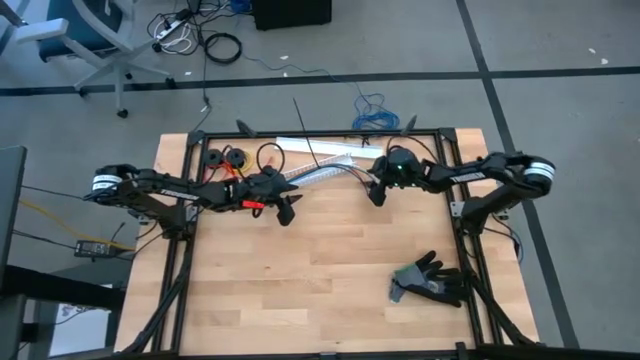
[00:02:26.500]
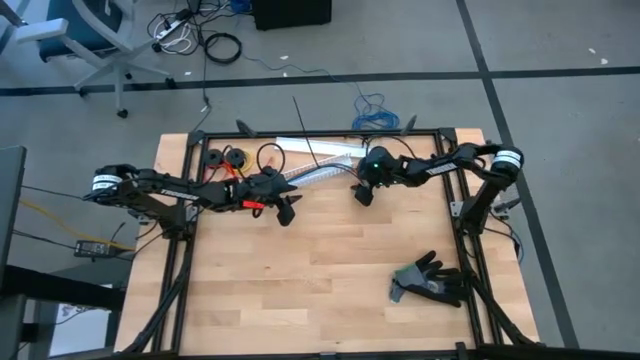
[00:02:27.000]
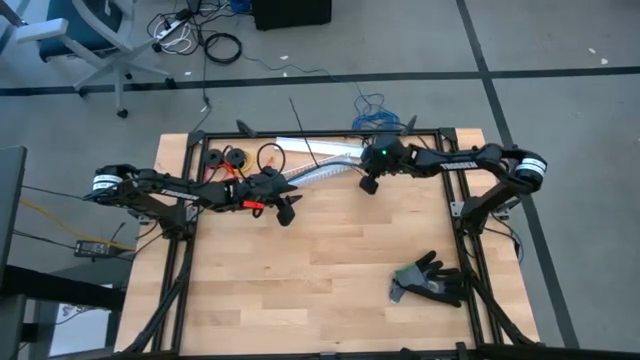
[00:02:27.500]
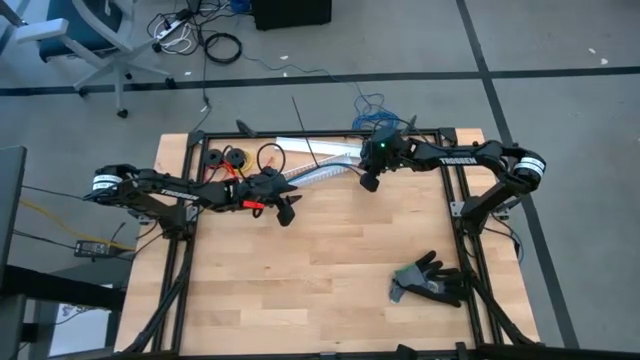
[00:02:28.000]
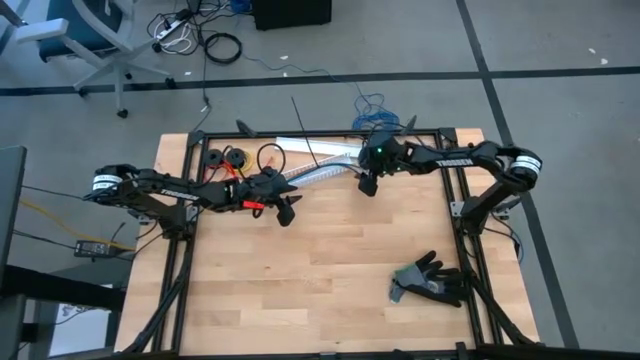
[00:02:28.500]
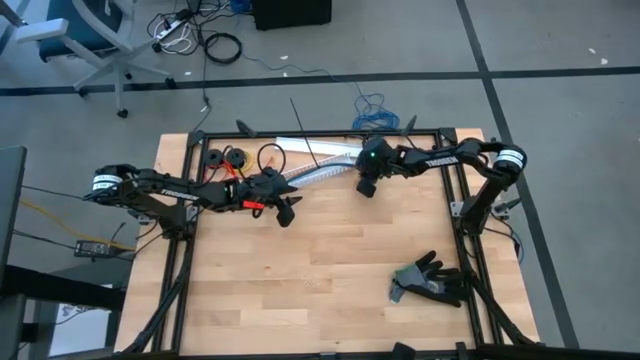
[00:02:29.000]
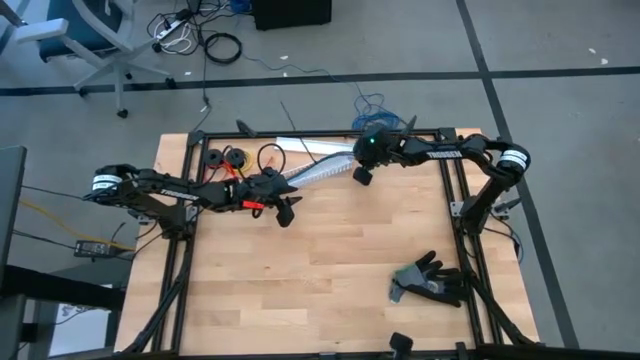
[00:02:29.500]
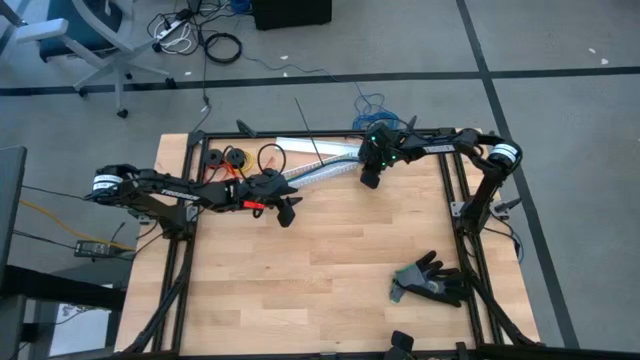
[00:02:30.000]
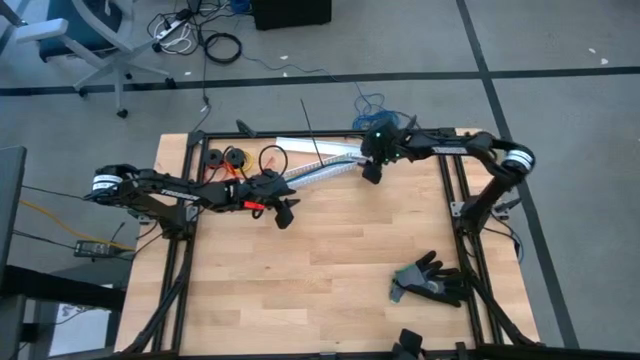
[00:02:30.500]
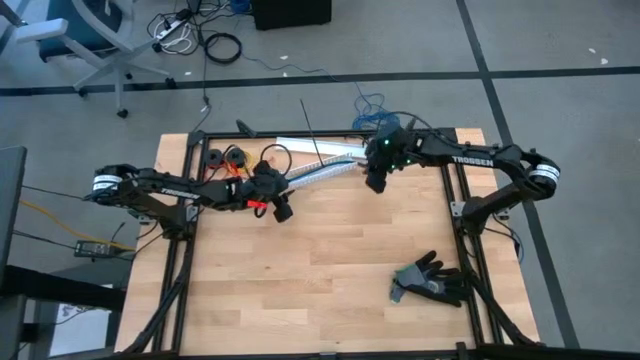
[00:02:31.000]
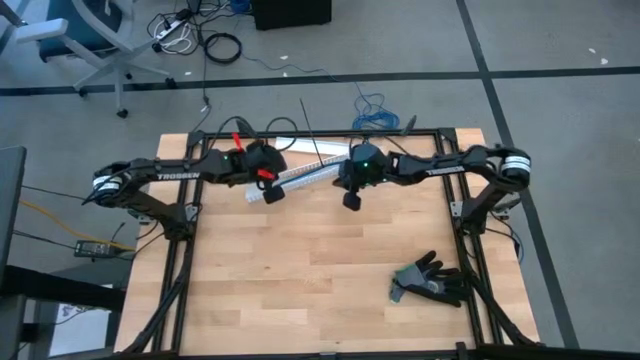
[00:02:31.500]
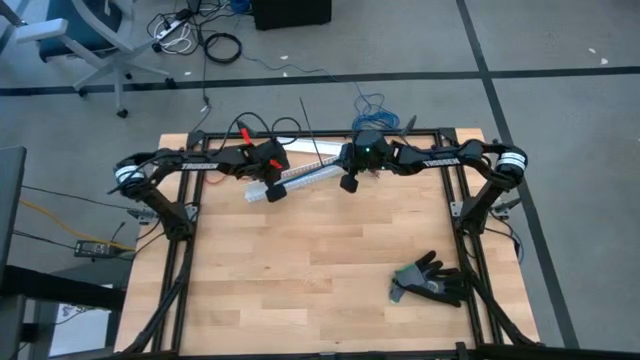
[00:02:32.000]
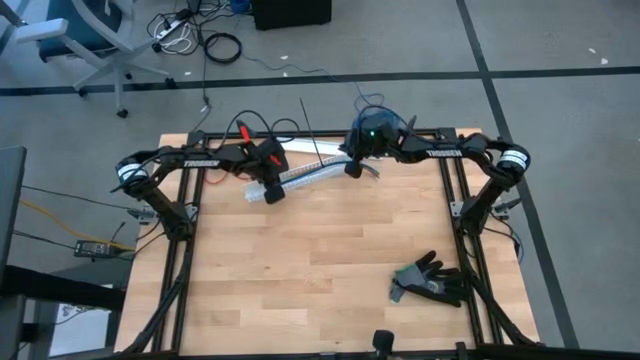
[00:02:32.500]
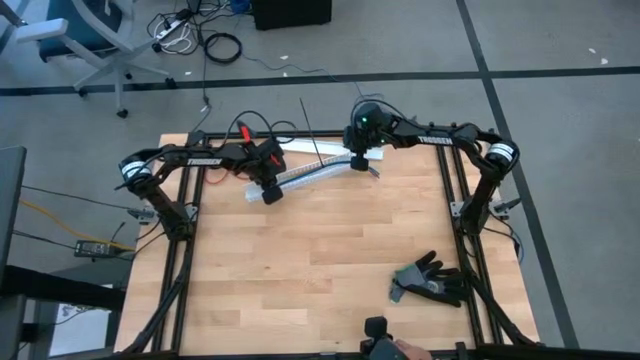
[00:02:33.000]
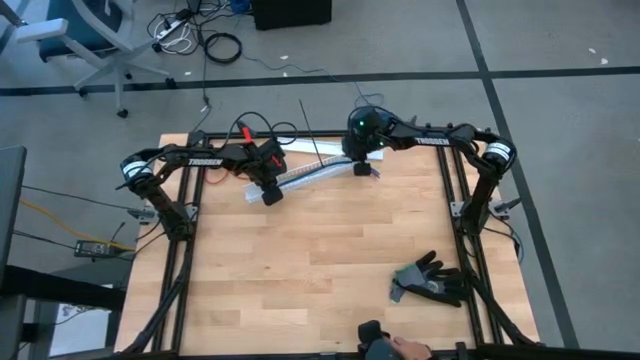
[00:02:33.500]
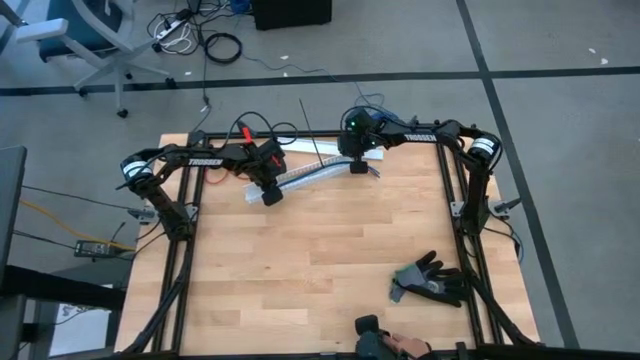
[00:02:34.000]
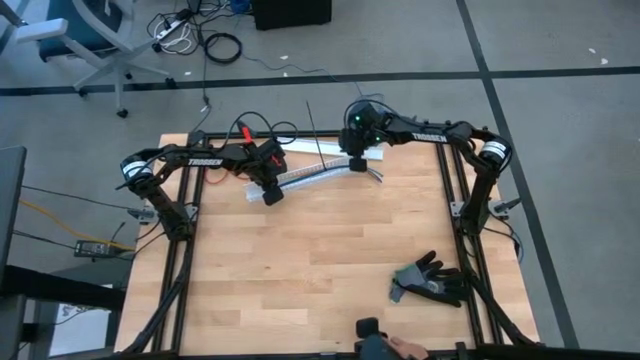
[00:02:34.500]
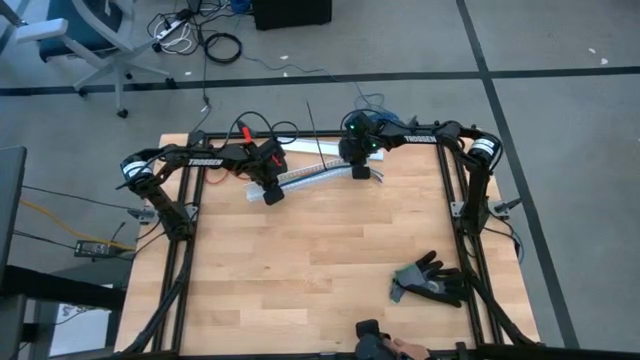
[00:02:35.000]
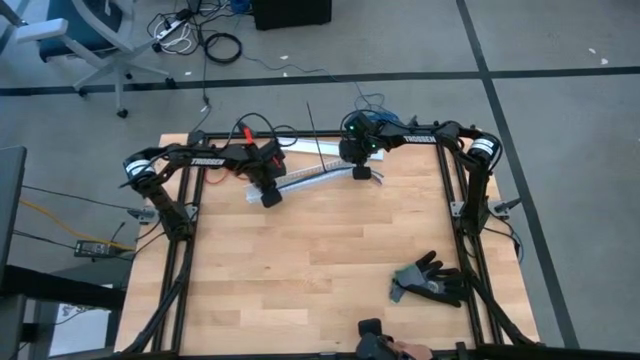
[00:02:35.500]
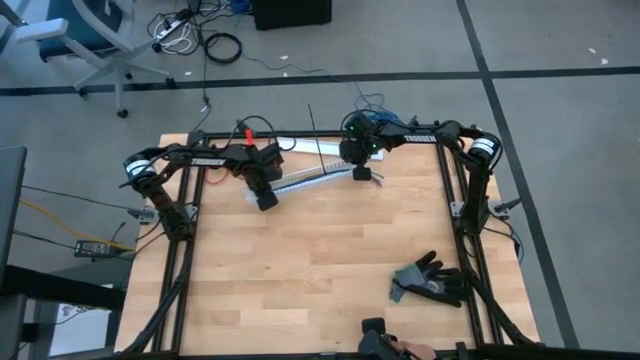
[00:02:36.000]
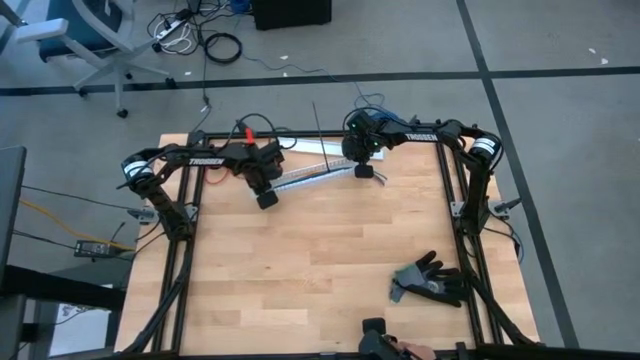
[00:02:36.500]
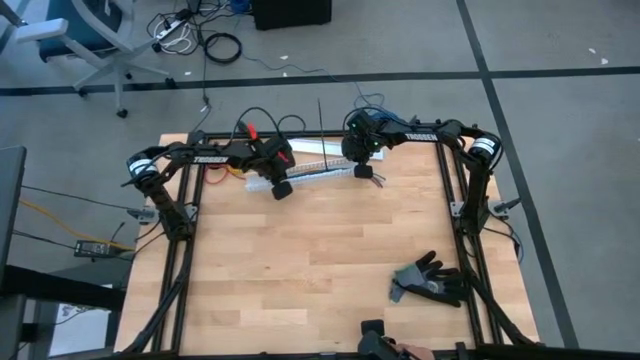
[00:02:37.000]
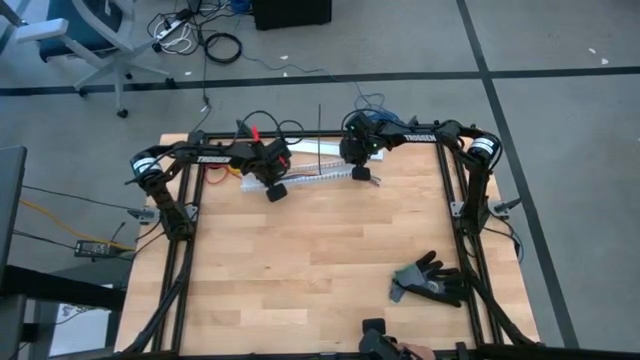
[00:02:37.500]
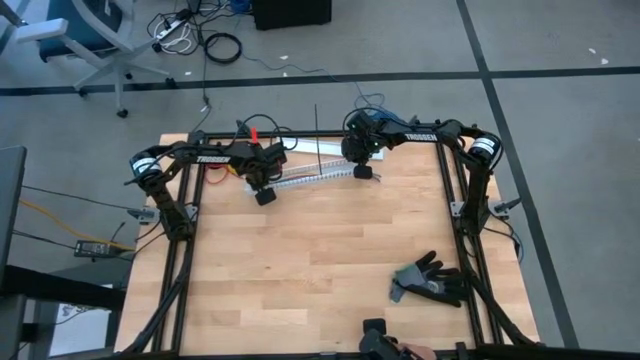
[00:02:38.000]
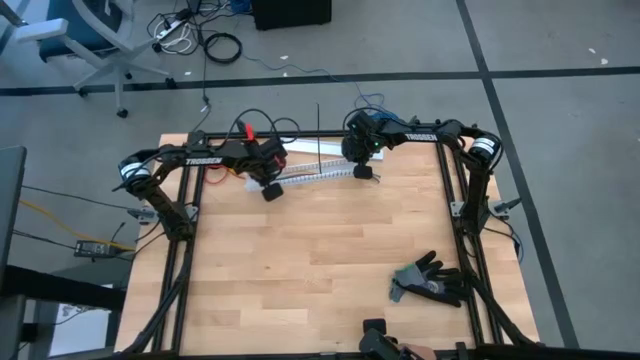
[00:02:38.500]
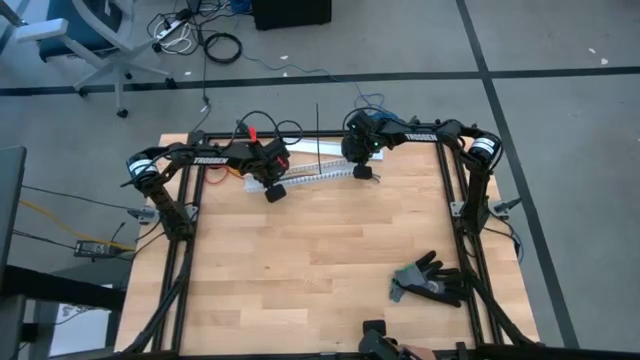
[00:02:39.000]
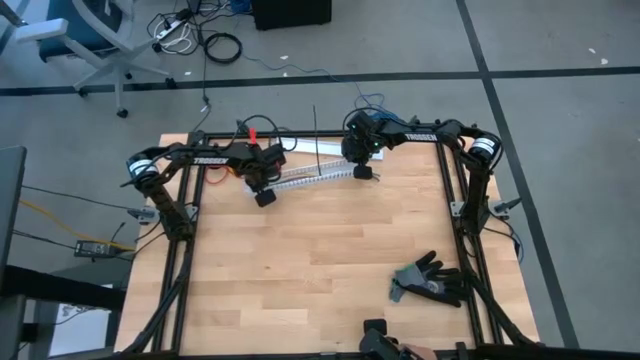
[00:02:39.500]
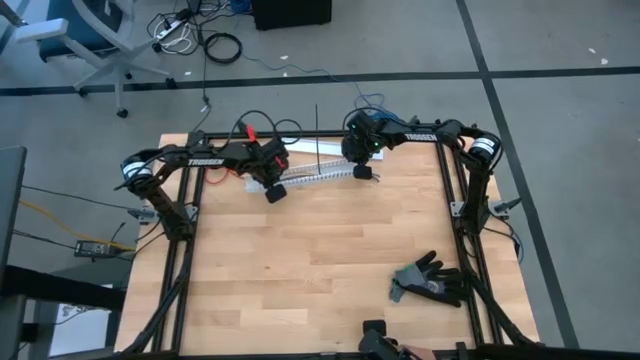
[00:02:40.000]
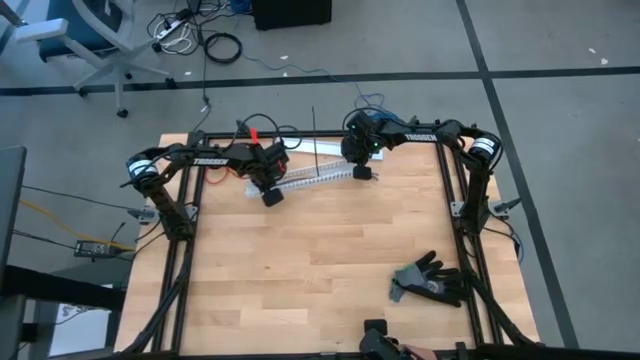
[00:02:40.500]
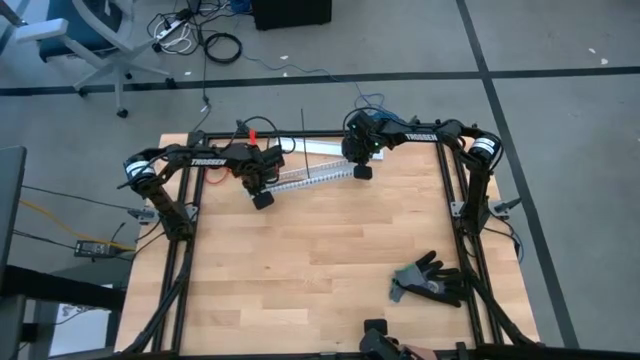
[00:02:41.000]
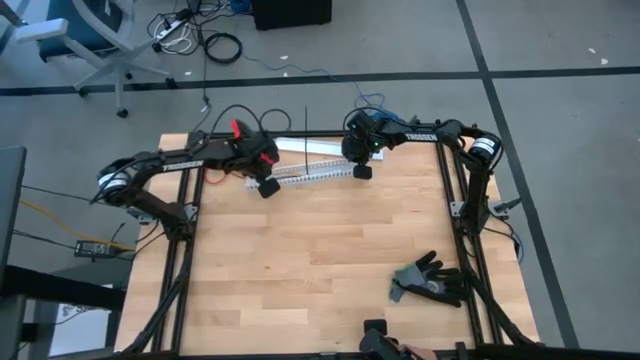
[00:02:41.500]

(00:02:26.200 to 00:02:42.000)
Task: Ziptie cables
Put the zip tied cables in the cable duct

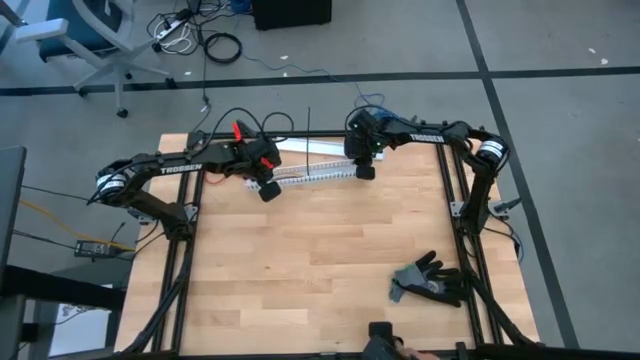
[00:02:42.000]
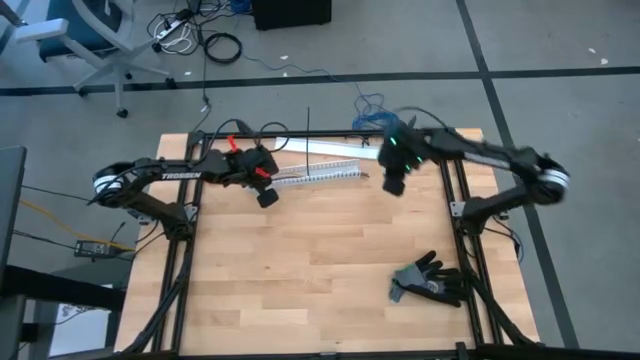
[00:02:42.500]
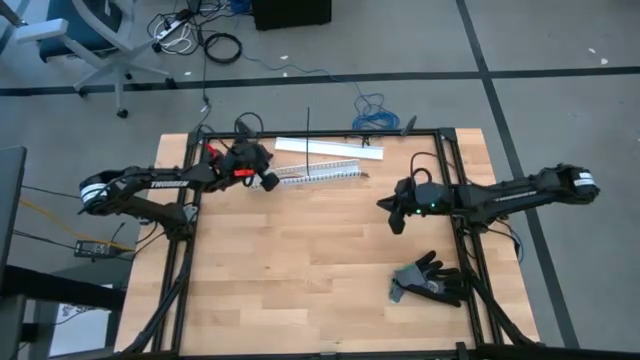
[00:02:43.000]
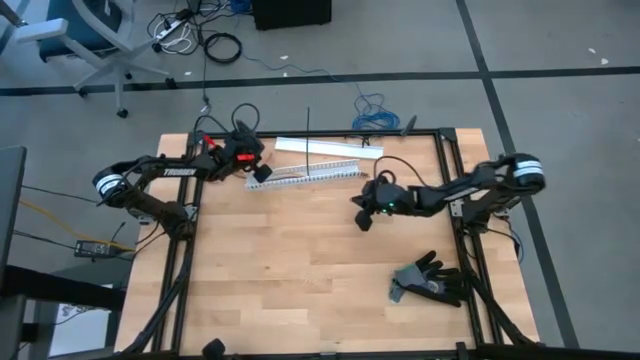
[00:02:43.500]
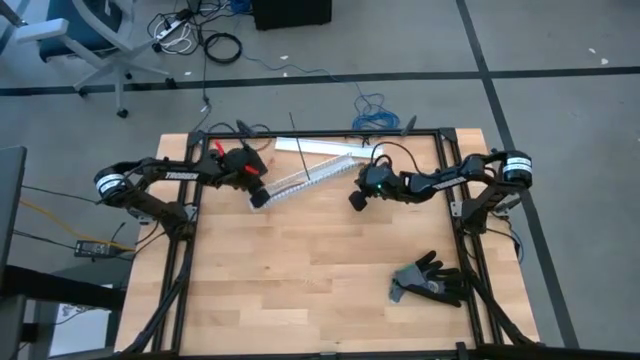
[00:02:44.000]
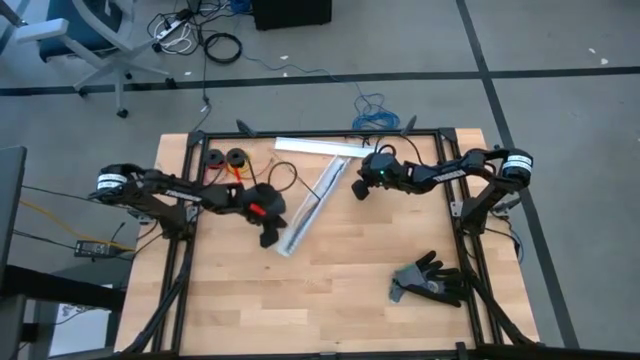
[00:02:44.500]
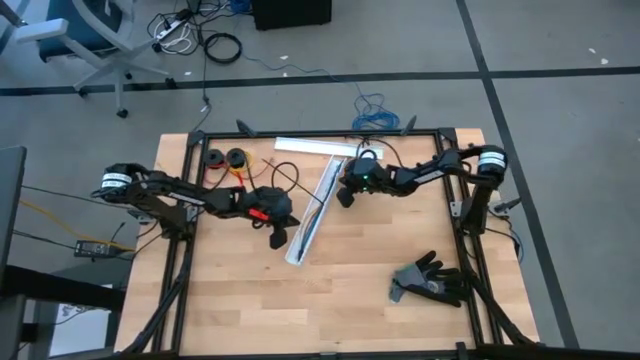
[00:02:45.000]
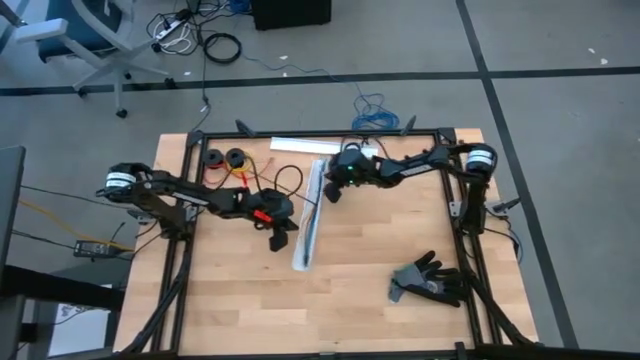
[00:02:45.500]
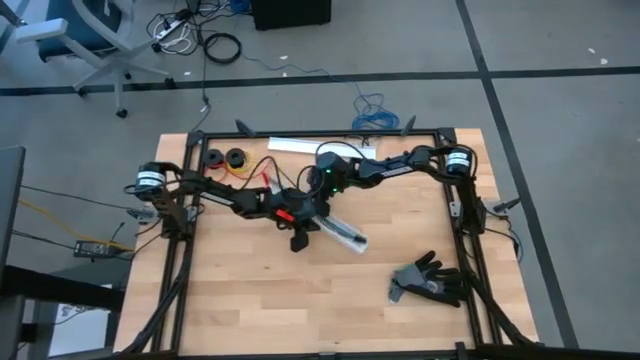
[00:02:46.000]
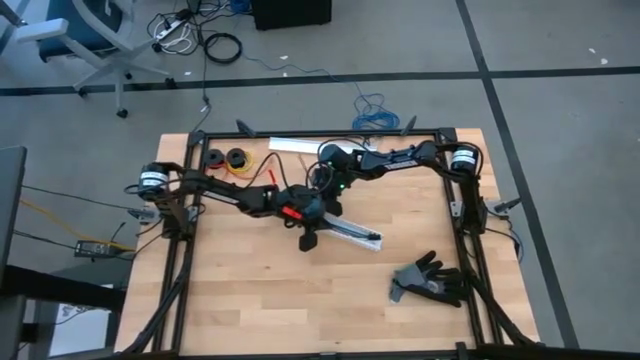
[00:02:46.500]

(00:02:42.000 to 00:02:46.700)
Adjust the white cable duct
